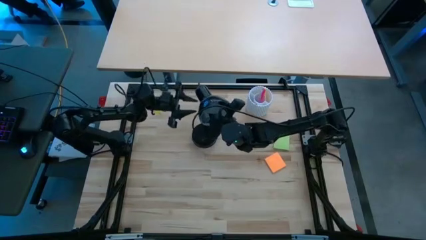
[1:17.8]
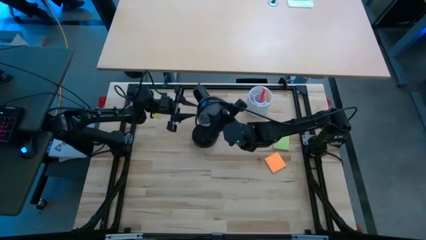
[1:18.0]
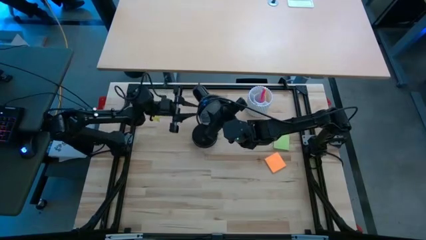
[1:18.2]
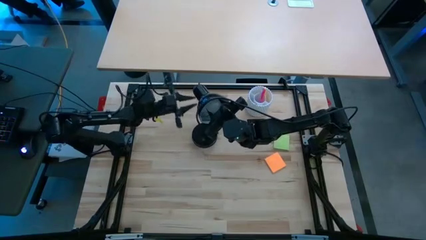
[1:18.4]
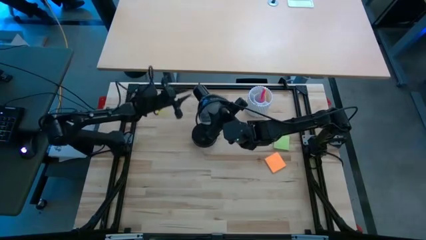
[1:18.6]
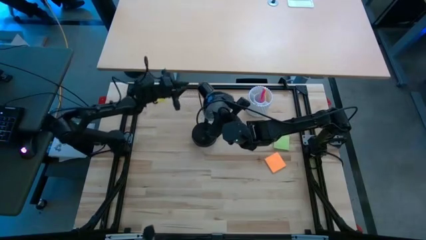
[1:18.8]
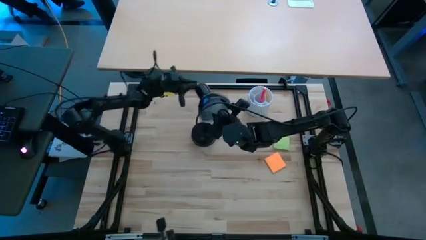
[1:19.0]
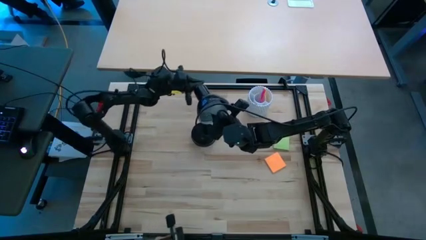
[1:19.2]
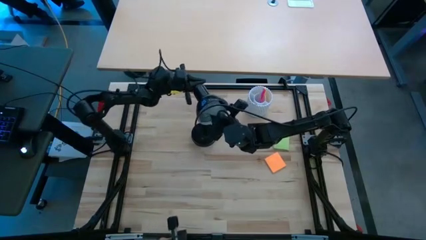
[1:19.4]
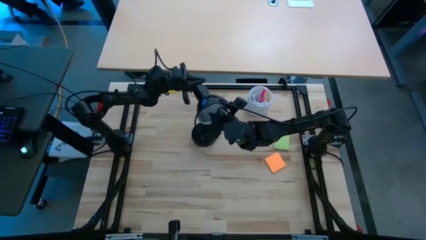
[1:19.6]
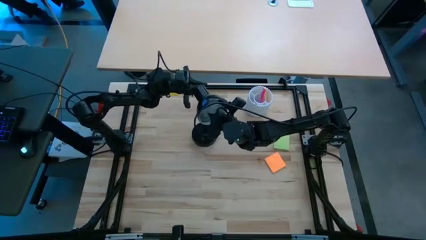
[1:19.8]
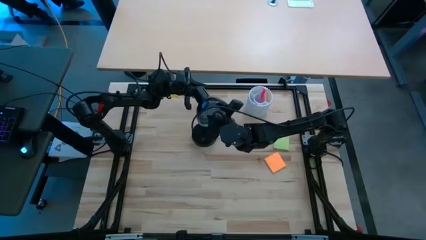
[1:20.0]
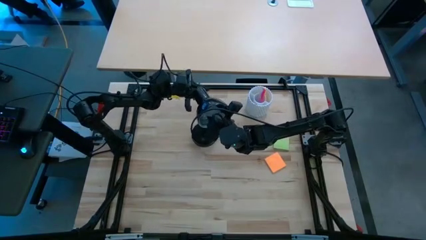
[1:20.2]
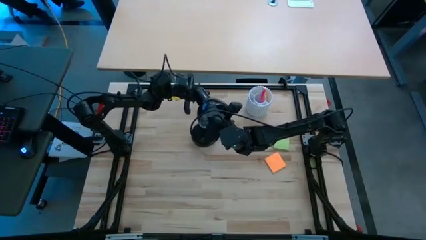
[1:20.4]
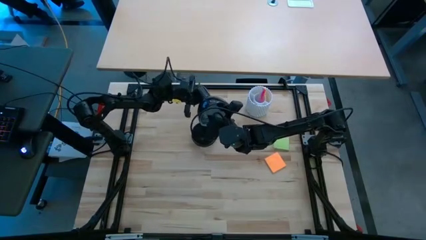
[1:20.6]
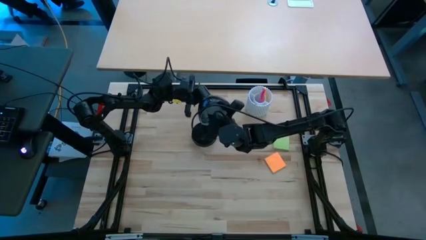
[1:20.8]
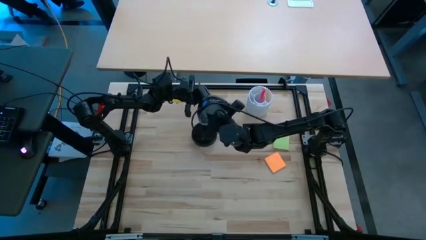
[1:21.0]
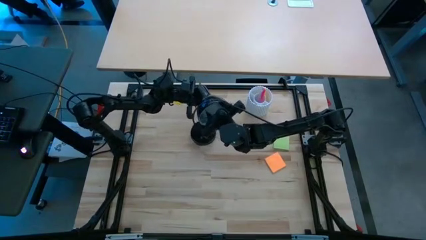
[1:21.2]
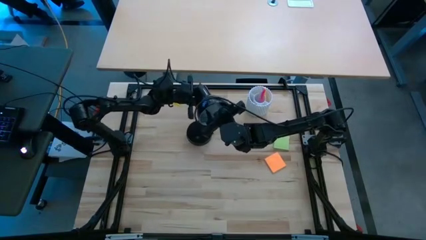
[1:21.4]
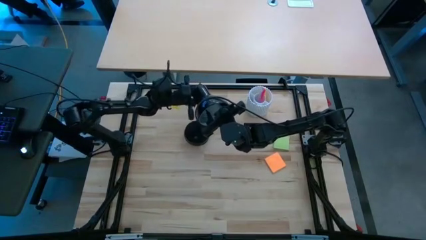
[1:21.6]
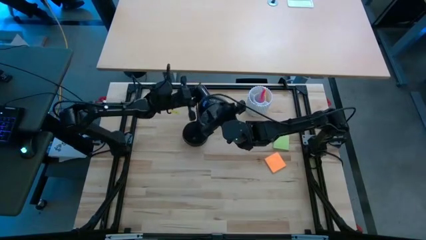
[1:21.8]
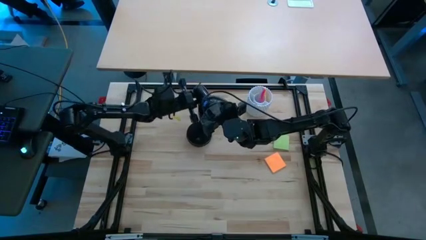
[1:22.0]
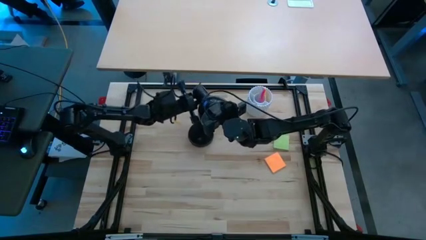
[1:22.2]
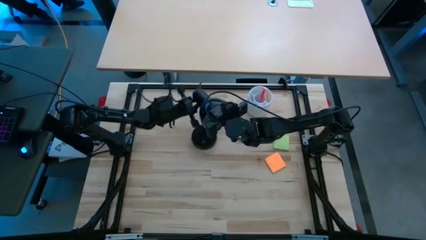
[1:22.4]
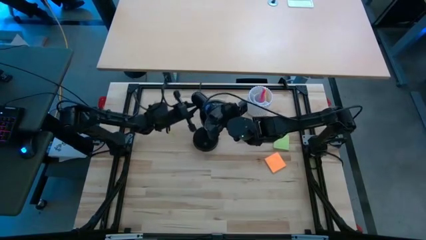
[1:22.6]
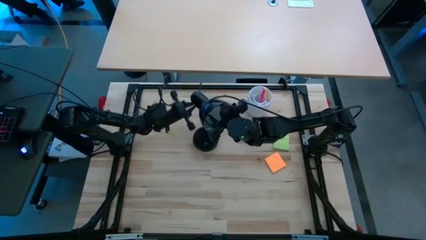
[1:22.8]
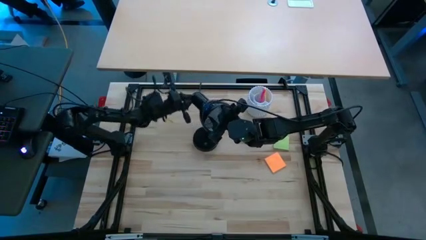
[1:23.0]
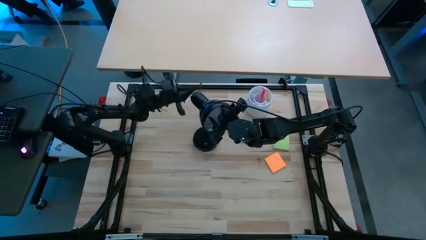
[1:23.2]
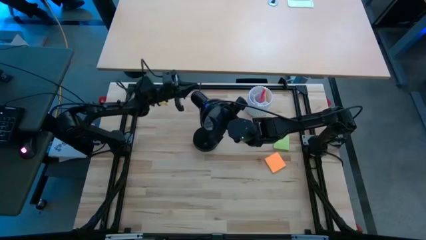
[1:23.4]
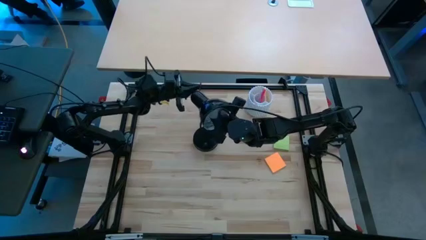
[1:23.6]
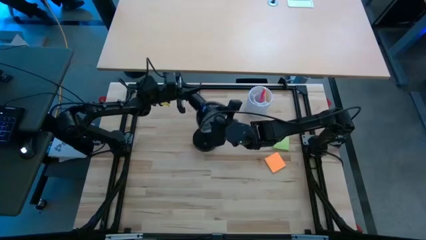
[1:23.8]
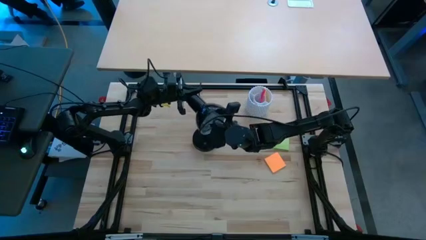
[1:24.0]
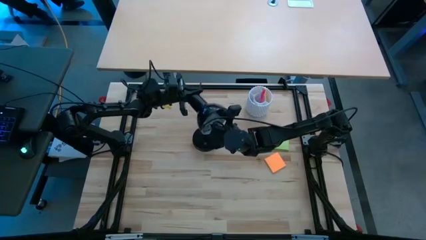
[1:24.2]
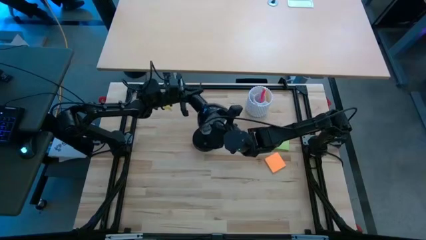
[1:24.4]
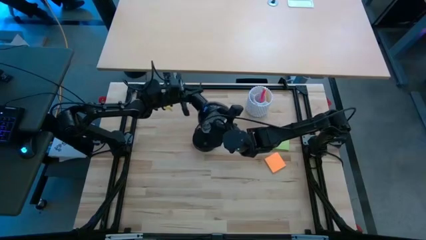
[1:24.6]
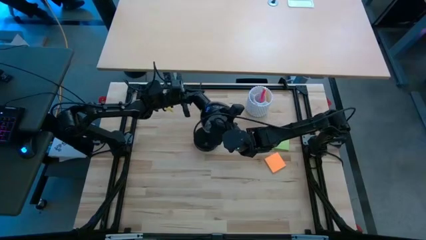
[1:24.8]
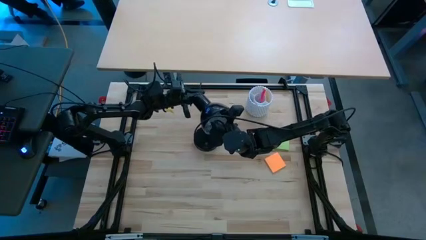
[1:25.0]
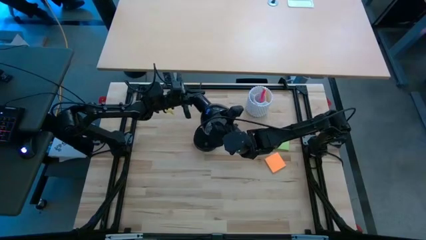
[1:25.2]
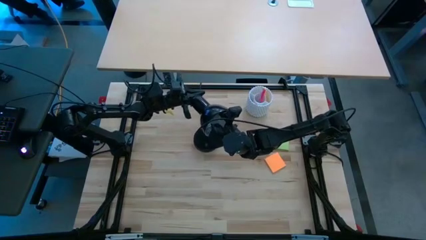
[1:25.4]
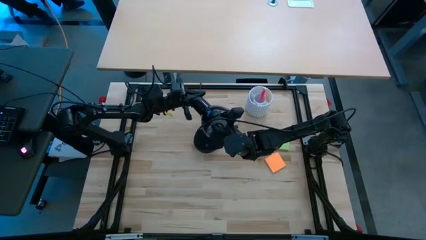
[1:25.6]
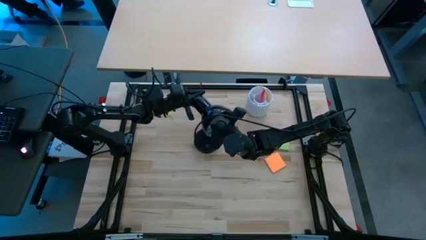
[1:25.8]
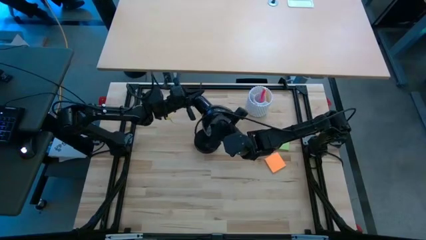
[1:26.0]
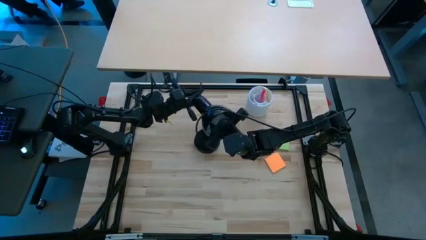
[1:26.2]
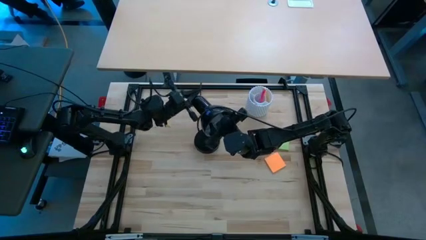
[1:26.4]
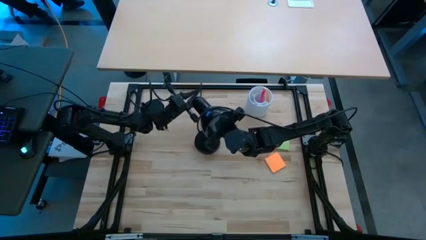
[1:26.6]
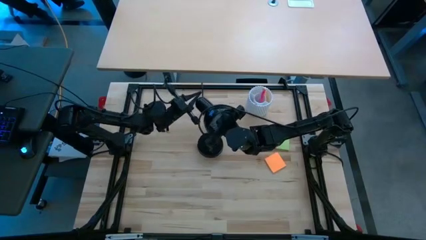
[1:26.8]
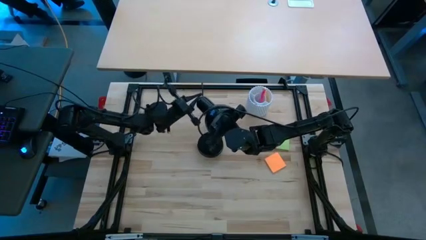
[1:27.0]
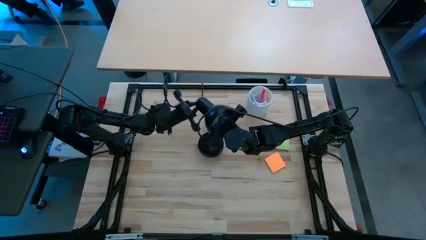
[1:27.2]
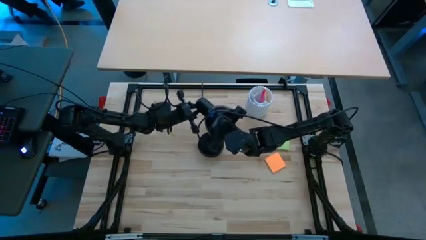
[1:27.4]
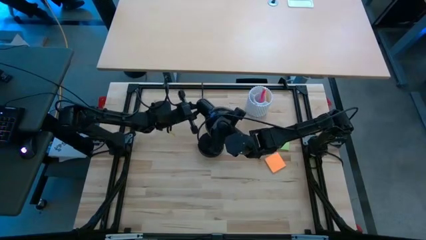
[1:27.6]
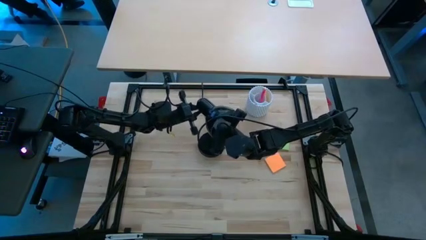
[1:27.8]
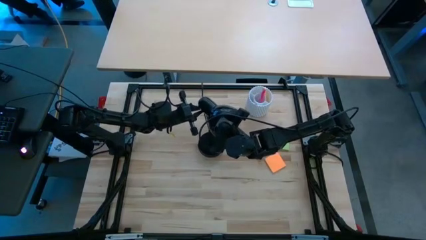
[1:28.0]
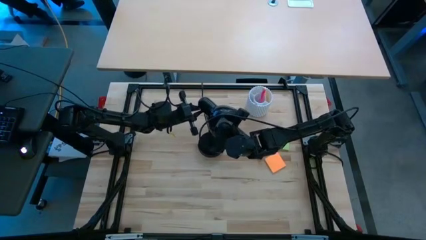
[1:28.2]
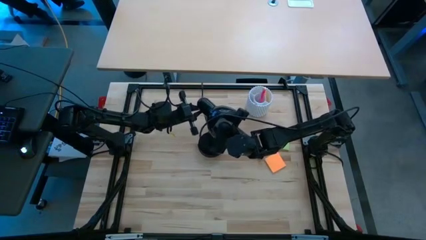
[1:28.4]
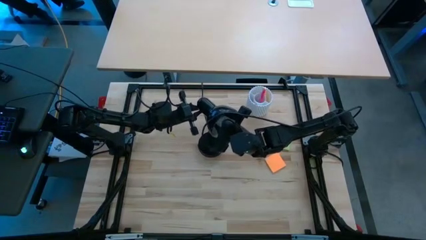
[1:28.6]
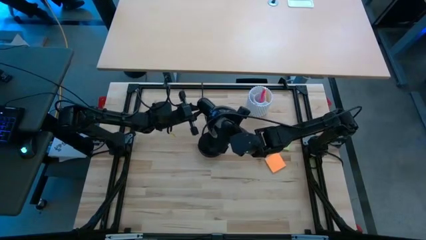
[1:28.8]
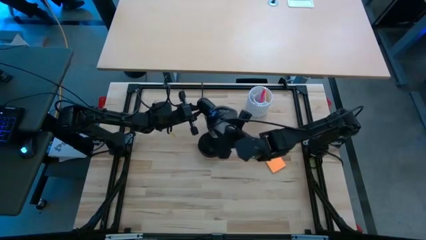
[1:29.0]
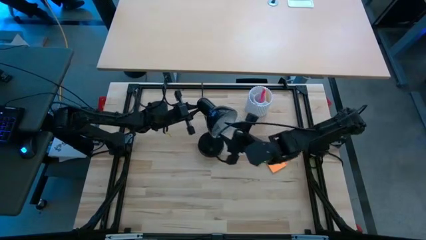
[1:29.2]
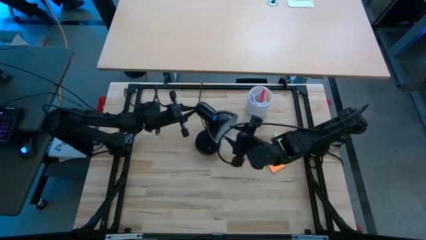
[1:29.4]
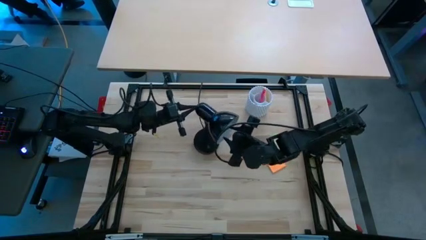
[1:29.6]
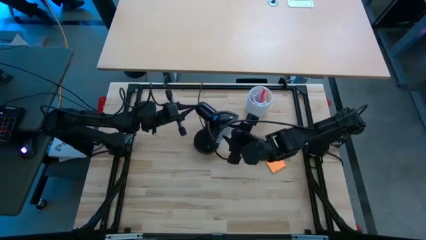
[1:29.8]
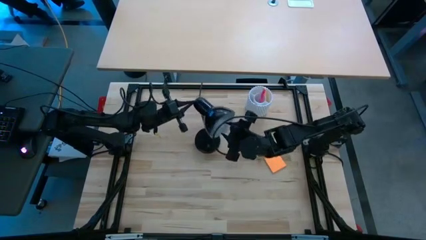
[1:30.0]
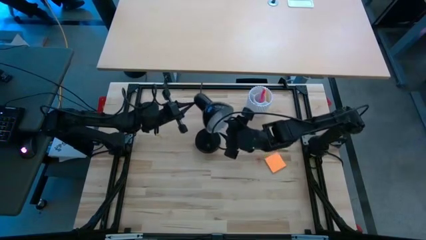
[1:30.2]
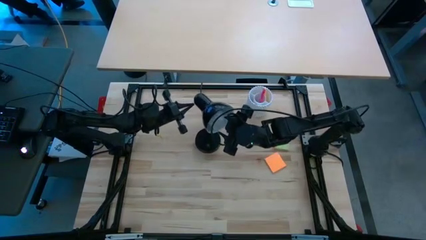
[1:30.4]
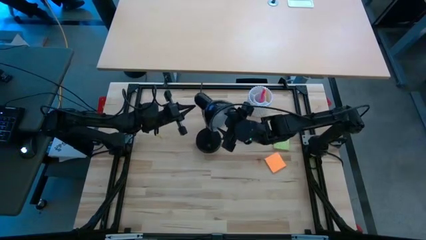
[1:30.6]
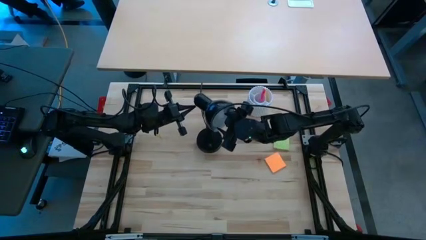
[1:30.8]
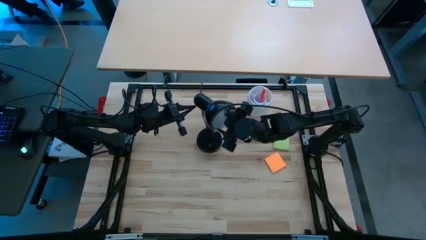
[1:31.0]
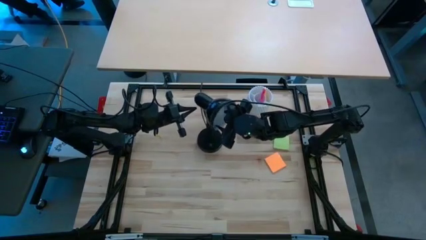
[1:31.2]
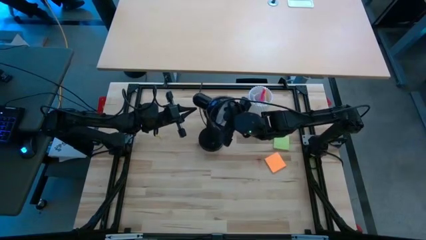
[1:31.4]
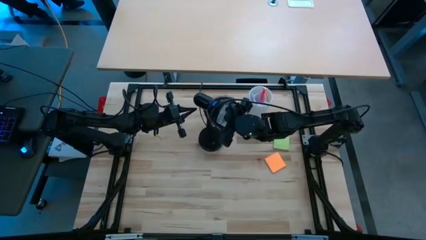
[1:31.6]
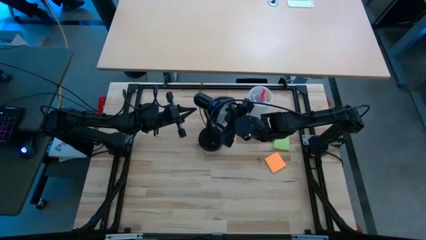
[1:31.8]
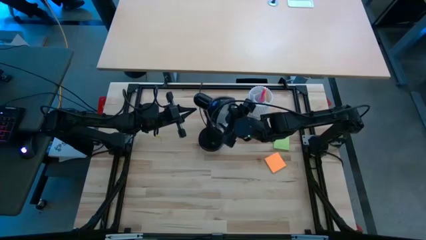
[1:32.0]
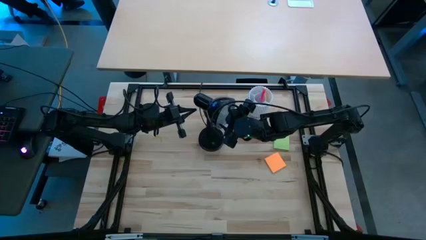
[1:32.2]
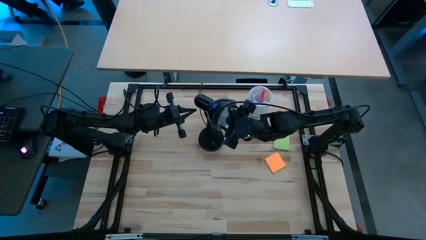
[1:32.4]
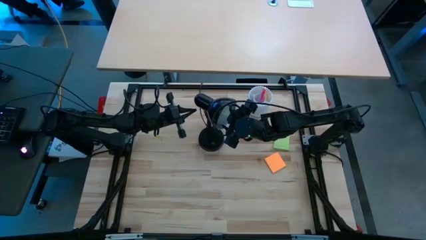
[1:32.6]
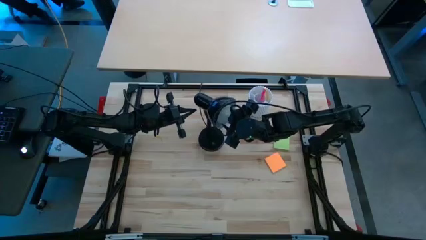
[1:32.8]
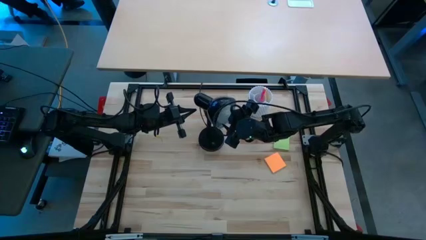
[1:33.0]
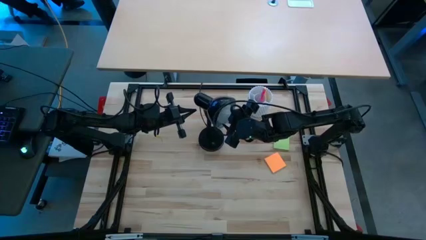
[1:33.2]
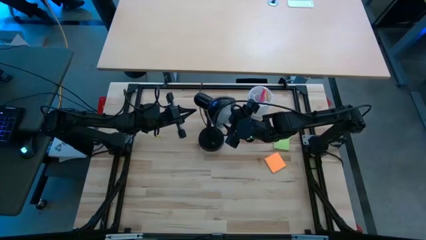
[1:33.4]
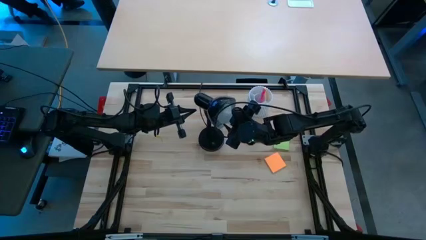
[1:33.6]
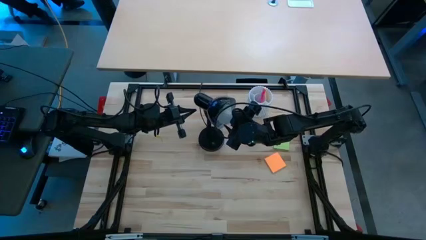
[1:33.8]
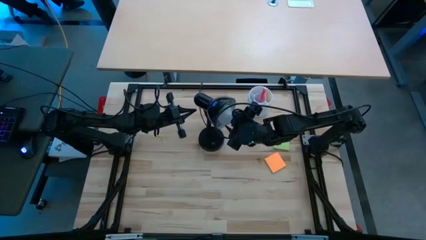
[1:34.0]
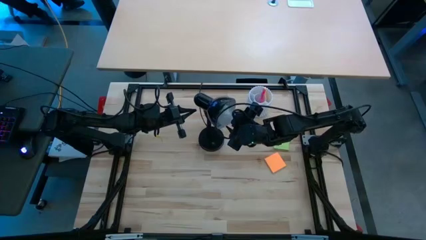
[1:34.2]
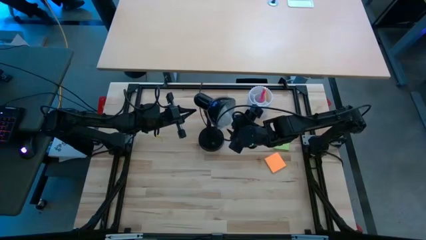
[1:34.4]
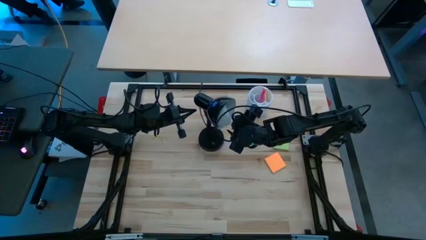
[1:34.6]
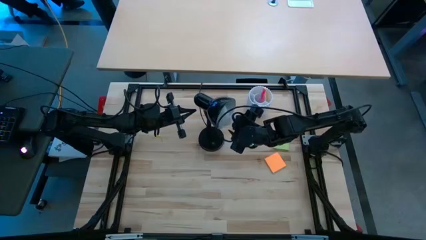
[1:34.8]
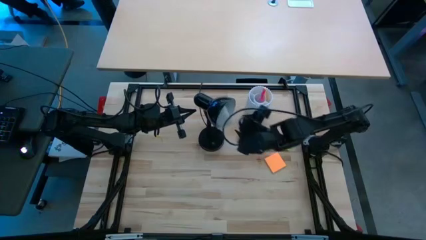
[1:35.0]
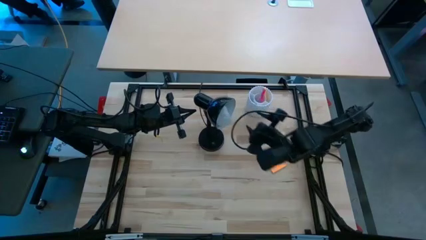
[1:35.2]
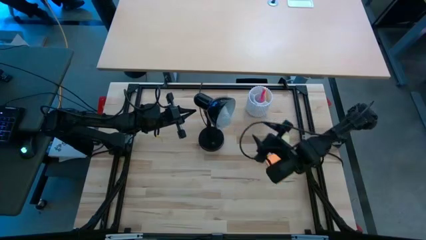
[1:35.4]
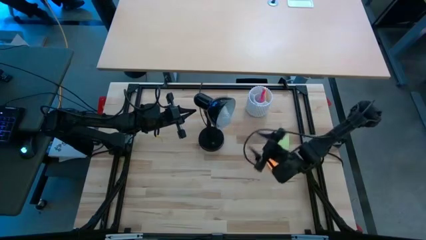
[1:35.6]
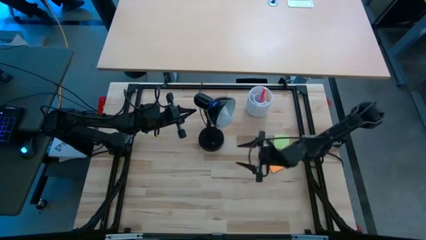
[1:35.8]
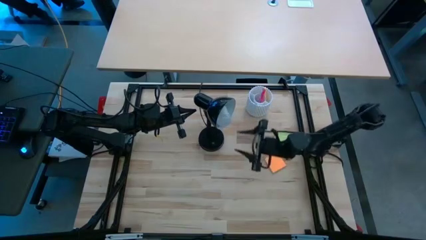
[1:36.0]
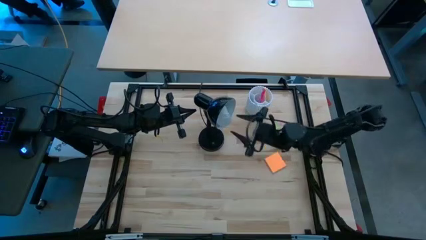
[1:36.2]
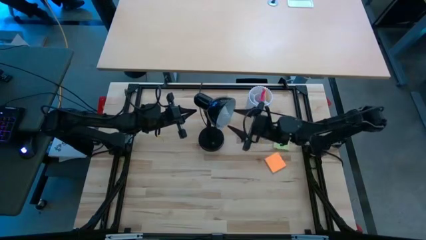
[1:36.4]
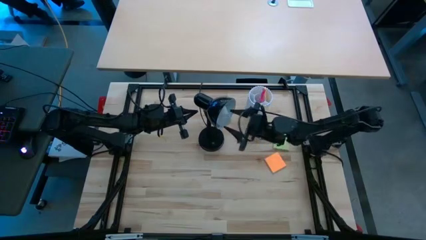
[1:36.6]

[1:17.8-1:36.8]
Task: Screw lightbulb
Insert the white lightbulb into the black lamp
